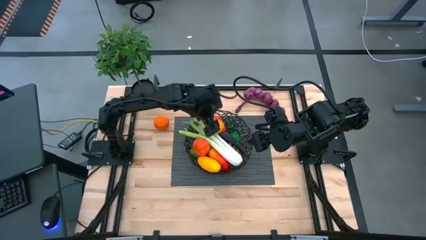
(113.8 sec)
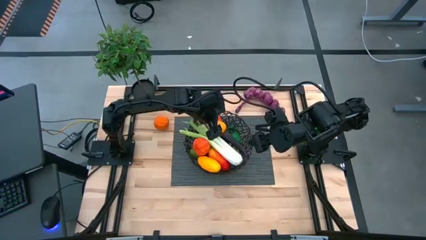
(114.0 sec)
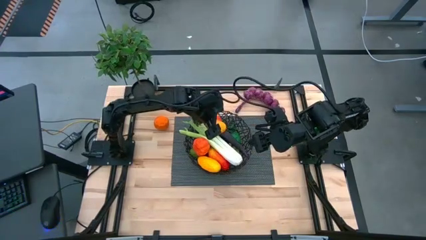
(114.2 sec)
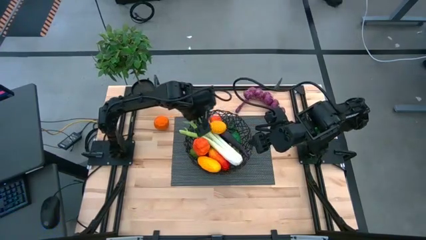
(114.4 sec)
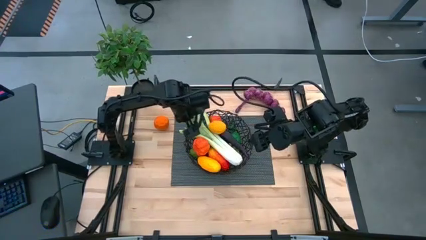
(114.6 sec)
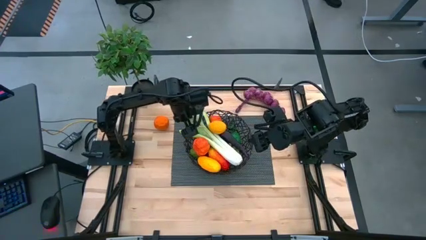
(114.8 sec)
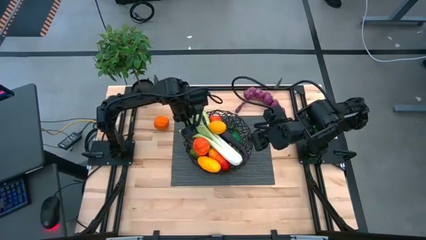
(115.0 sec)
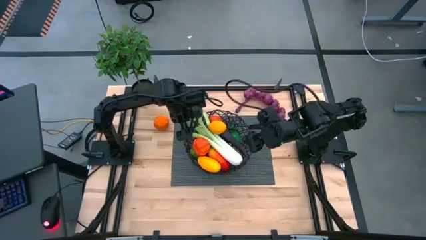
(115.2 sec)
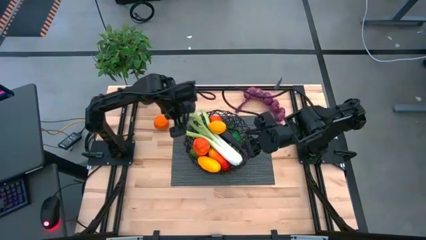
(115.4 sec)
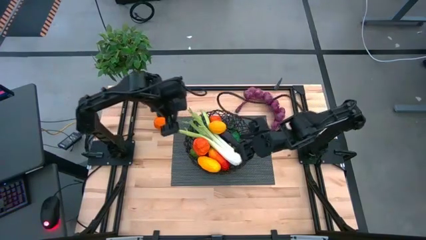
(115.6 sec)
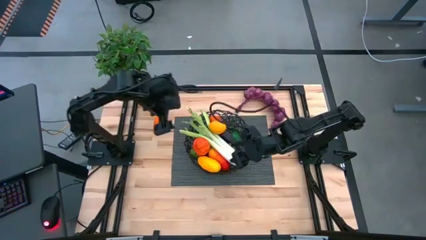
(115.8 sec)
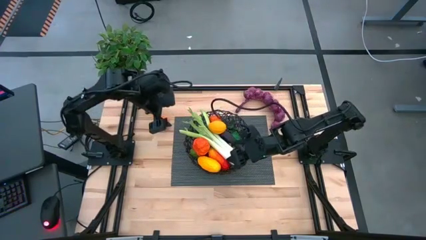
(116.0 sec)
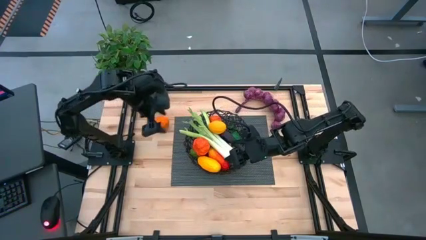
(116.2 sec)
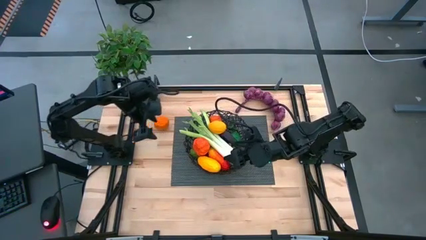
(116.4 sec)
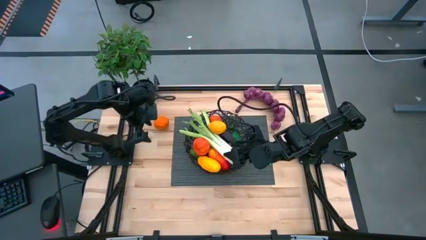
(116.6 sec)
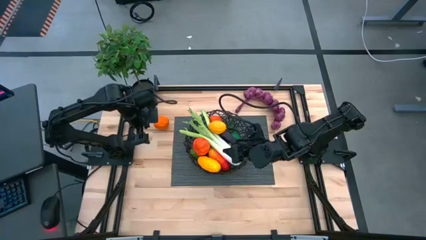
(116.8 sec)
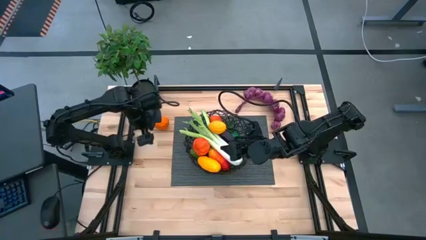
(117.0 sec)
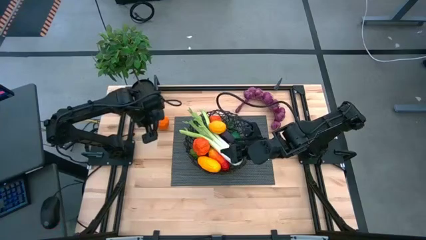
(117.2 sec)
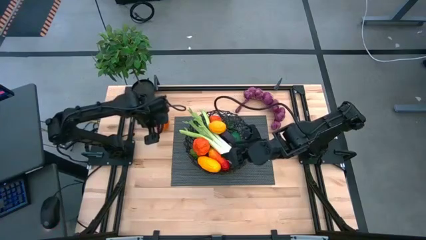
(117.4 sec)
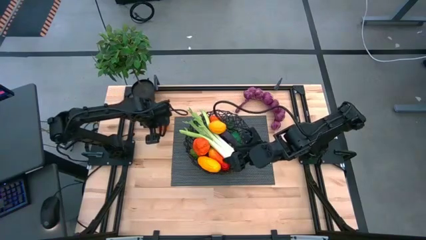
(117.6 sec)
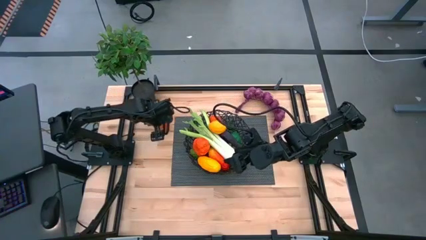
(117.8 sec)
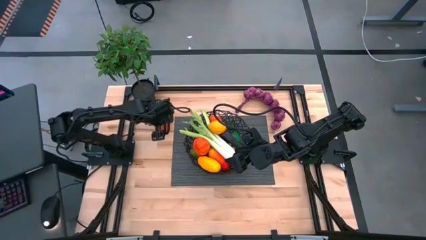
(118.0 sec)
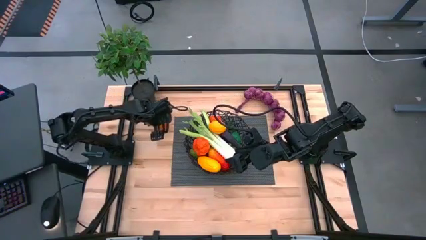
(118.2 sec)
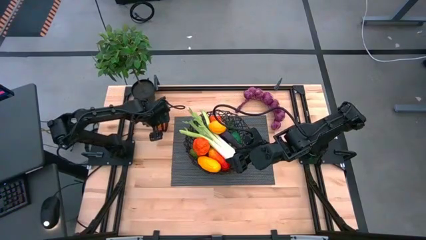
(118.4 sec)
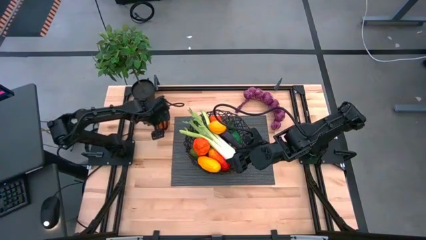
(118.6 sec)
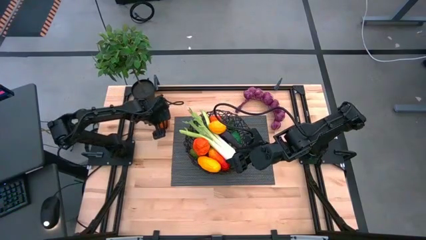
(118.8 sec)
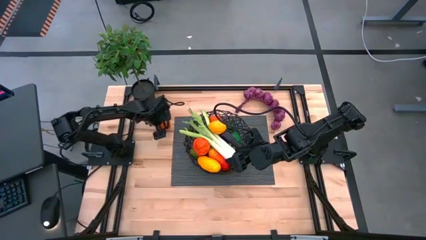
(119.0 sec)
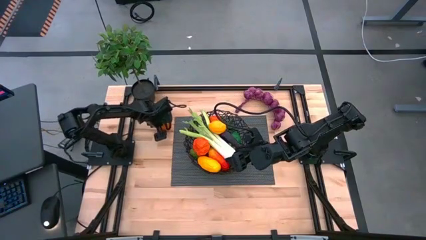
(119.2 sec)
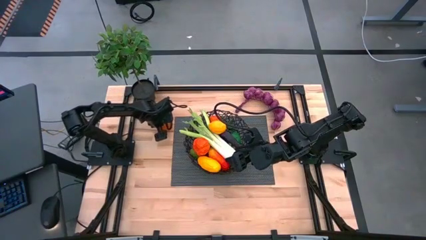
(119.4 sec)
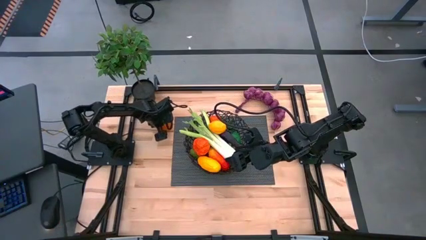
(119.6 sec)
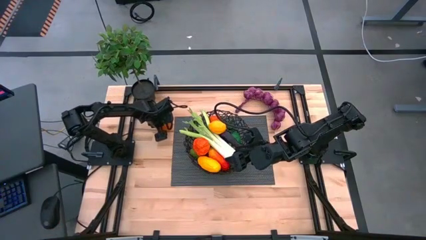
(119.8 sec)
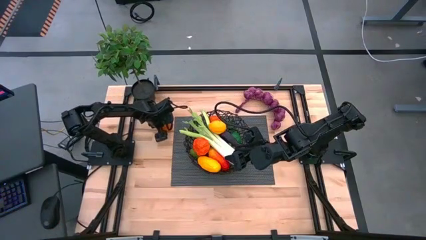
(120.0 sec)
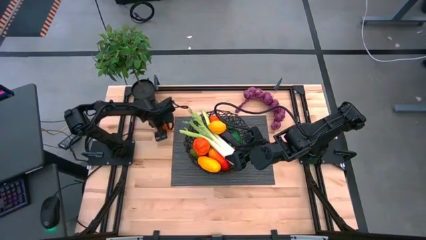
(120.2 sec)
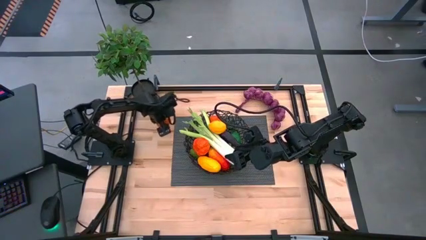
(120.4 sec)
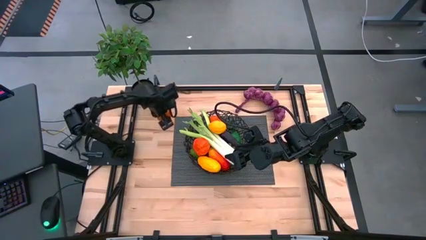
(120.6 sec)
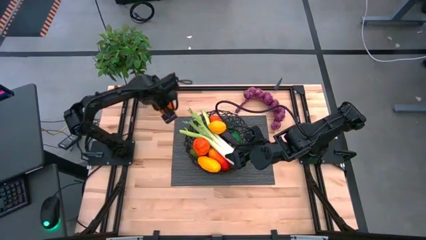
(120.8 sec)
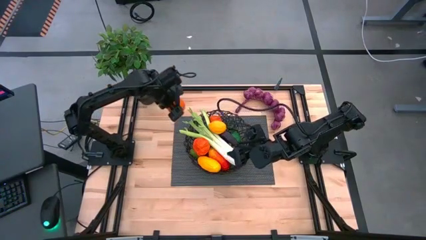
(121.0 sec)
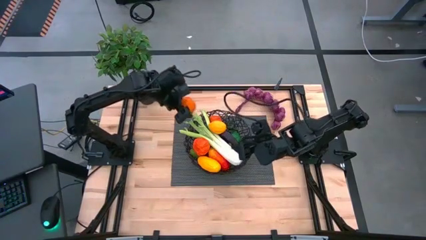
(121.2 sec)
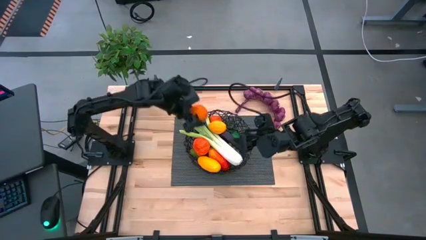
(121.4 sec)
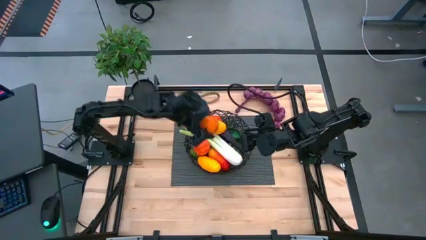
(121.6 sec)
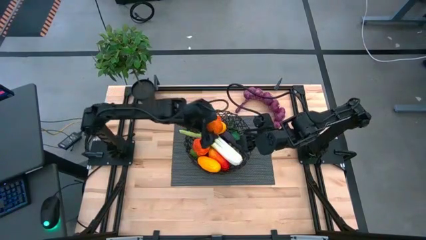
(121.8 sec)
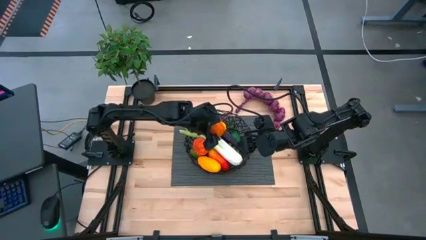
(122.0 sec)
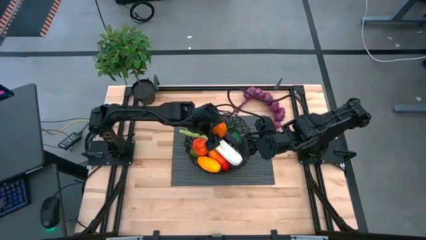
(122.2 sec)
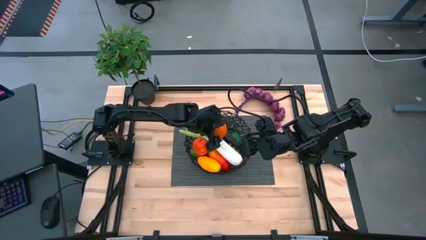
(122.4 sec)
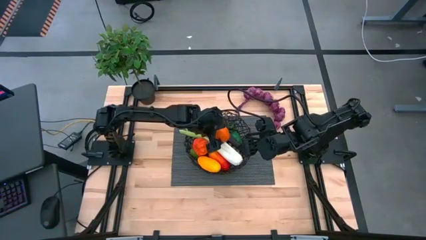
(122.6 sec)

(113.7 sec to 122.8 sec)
Task: Build produce basket
Put the orange into the black basket

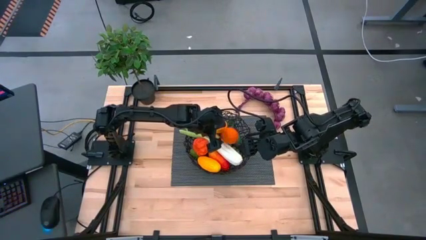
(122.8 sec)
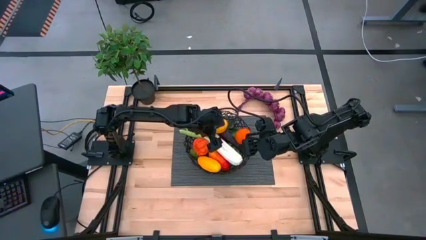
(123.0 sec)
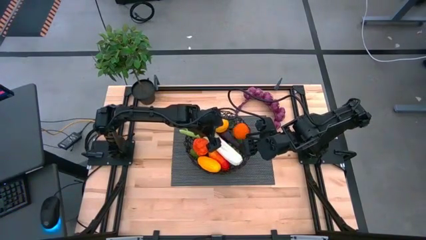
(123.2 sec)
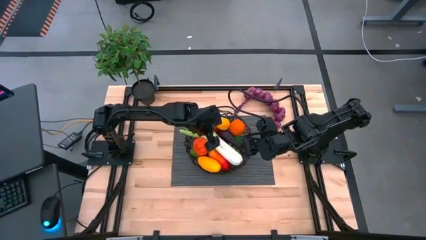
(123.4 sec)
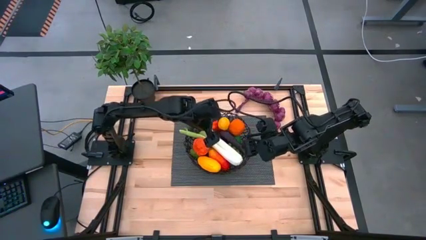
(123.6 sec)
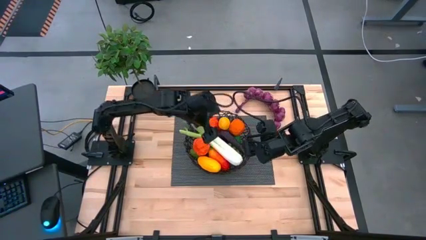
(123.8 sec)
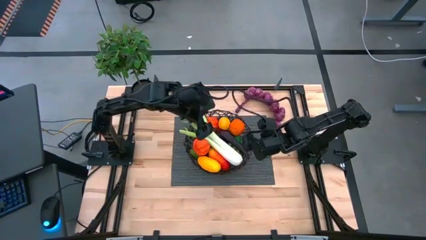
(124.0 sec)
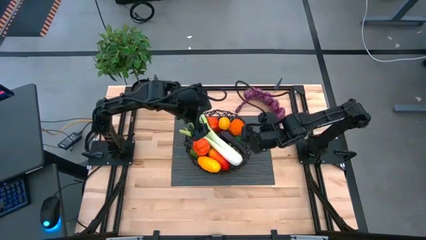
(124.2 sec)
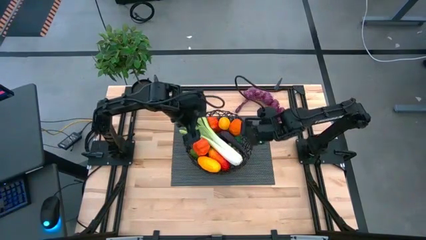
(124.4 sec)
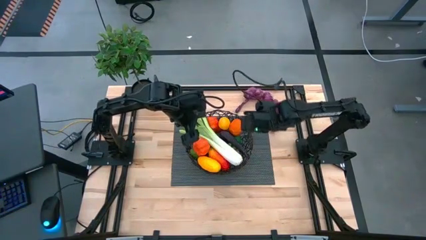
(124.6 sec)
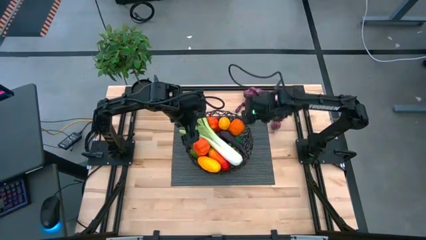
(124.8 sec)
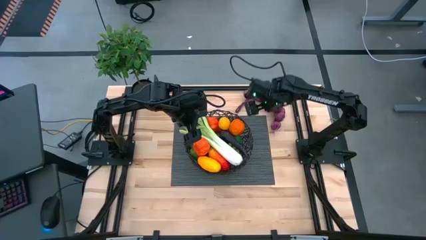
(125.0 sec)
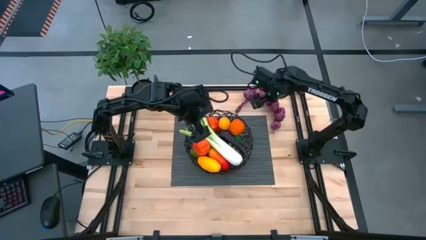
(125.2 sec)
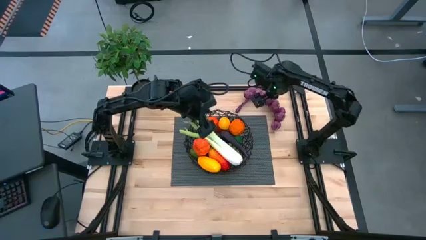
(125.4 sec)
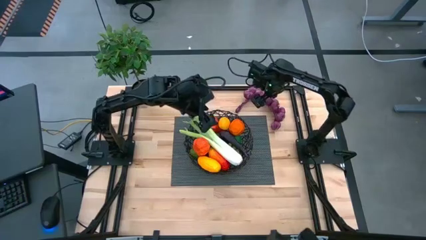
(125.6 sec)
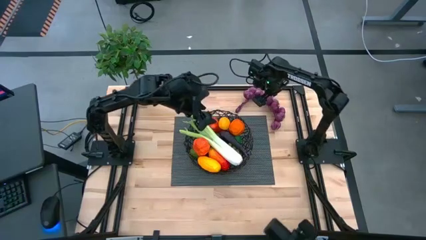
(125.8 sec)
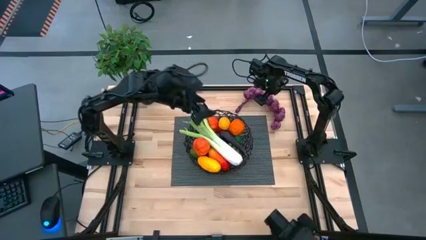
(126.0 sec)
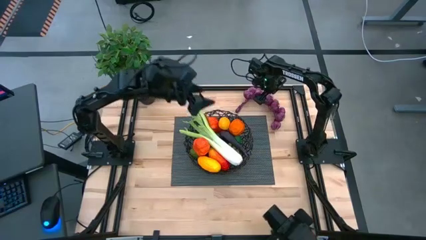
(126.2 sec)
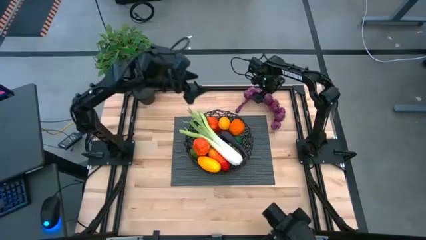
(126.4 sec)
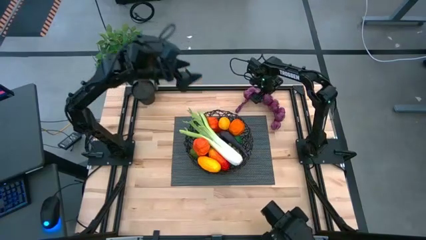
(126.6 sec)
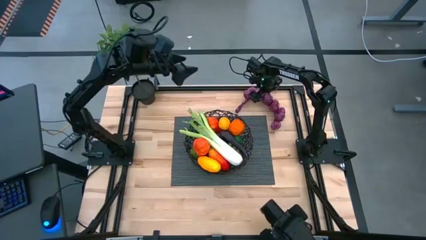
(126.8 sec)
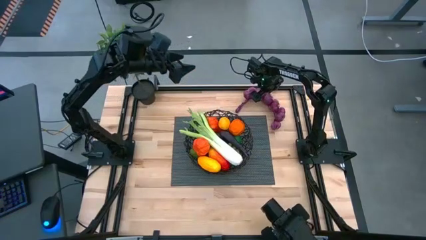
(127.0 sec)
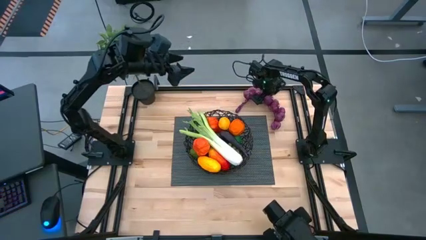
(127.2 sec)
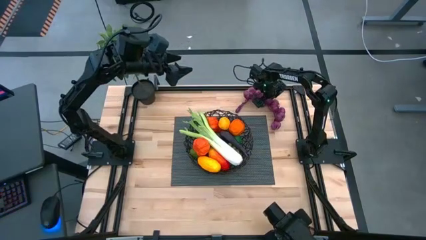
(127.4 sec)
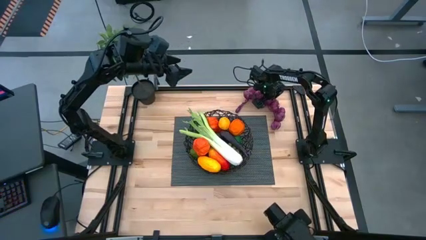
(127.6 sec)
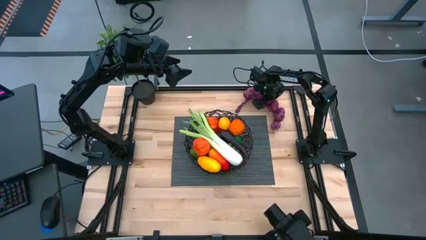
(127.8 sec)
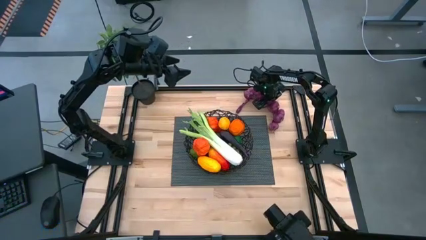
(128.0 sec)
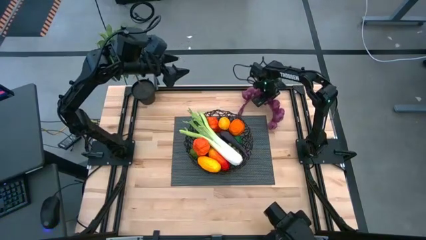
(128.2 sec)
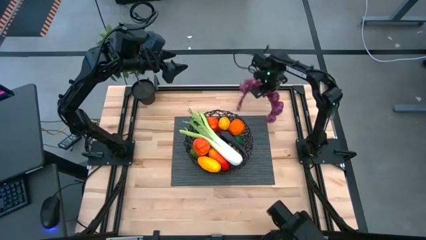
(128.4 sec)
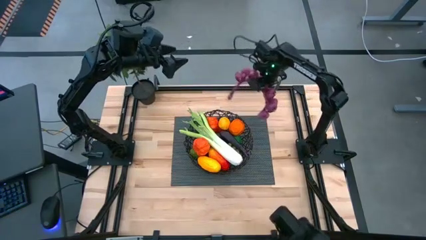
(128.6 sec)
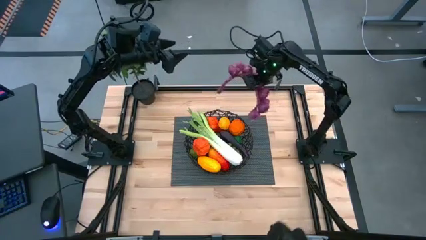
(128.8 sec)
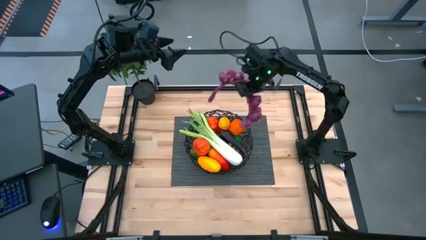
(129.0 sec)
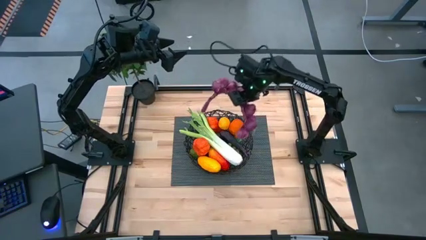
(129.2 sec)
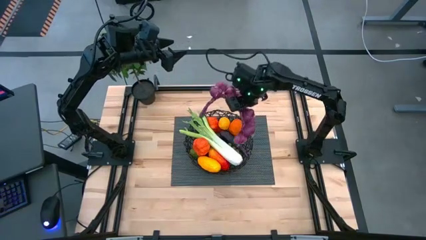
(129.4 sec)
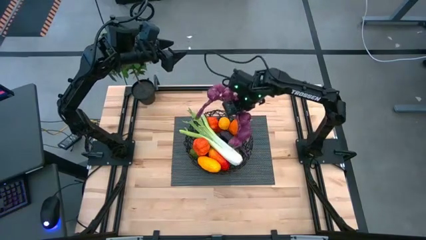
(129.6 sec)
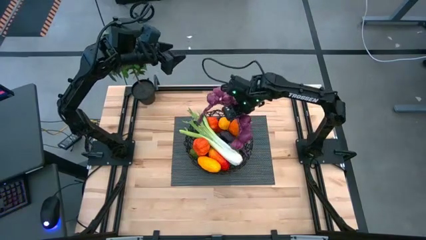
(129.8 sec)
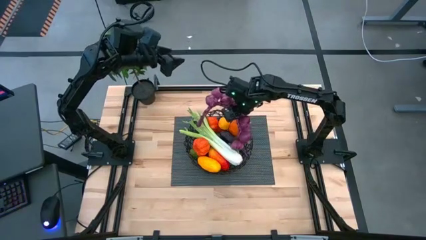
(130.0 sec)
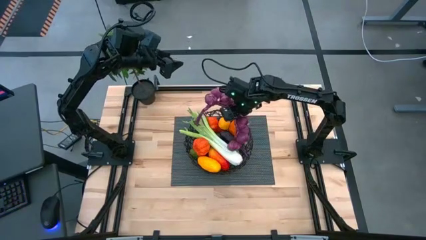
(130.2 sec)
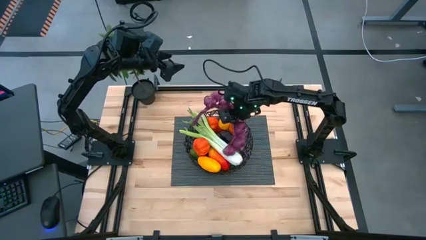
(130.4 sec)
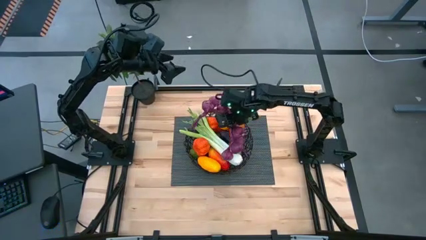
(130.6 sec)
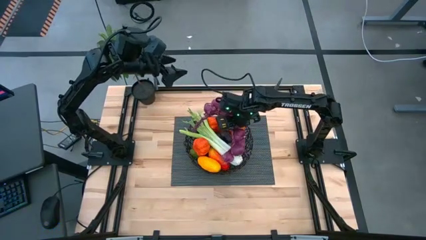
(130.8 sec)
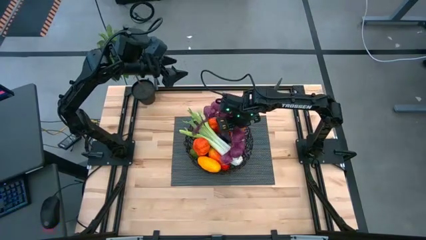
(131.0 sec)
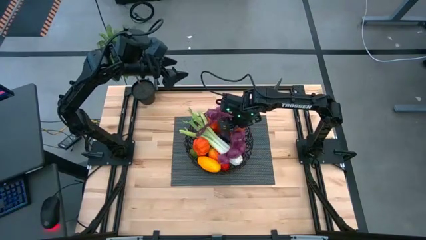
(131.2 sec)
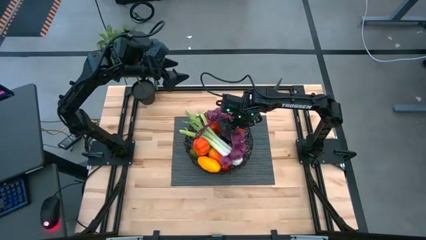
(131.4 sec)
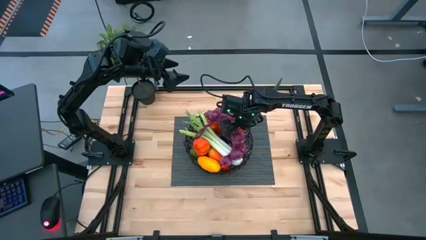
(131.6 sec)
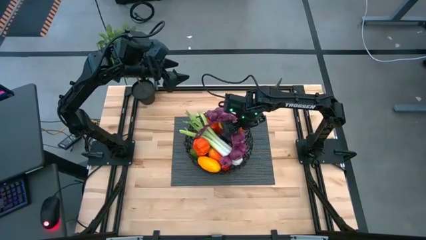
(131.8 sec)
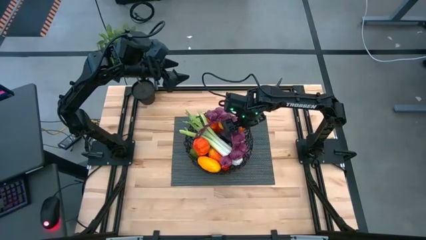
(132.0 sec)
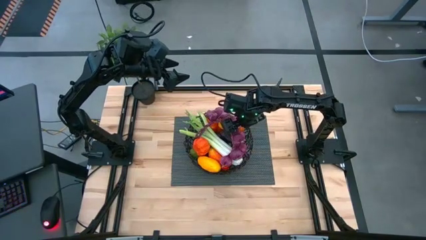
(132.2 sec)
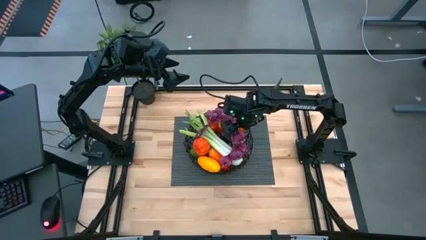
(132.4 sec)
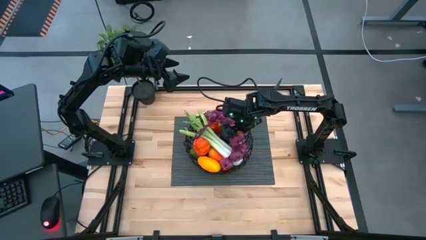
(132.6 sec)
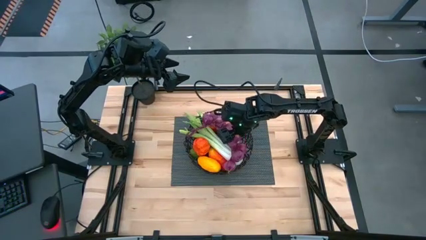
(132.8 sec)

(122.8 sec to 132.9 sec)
Put the purple garlic into the black basket
